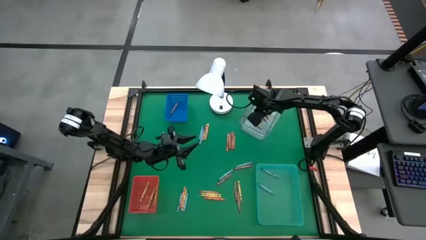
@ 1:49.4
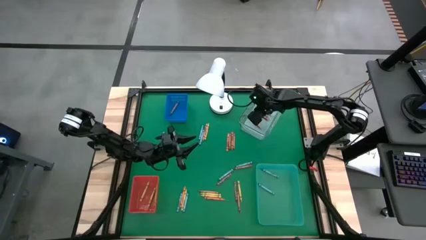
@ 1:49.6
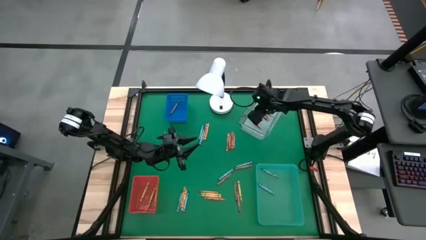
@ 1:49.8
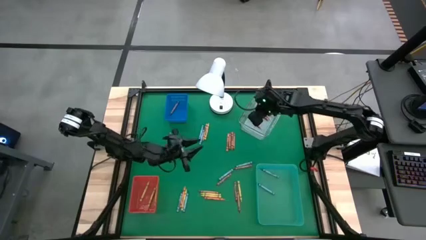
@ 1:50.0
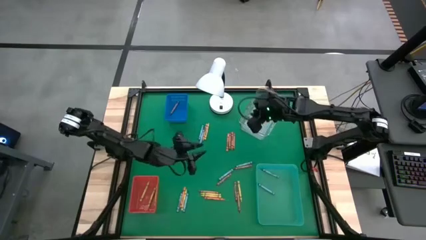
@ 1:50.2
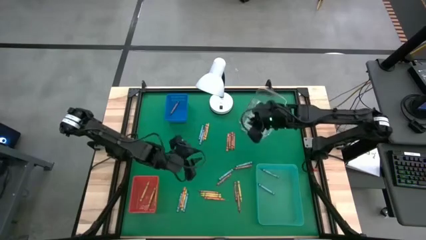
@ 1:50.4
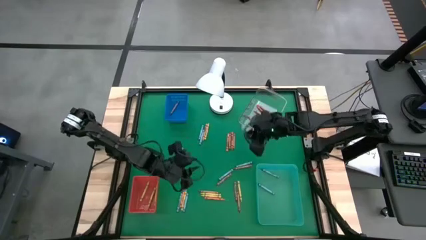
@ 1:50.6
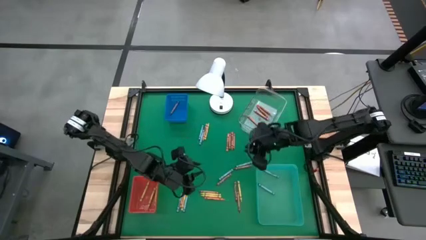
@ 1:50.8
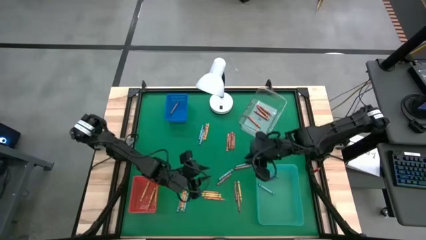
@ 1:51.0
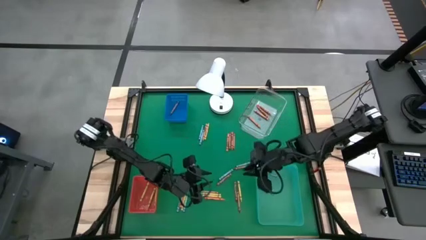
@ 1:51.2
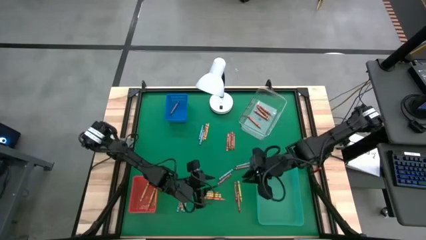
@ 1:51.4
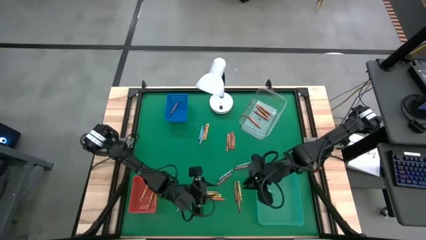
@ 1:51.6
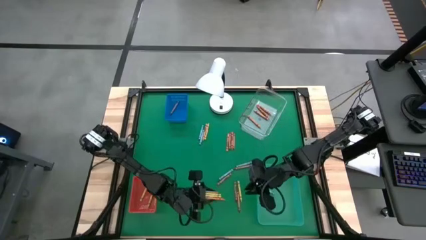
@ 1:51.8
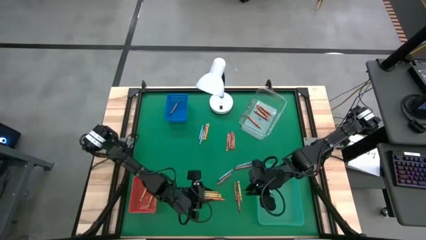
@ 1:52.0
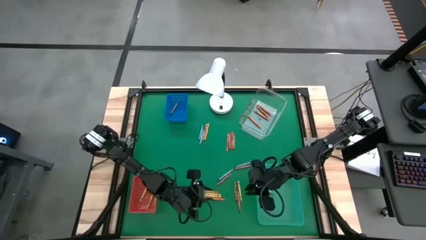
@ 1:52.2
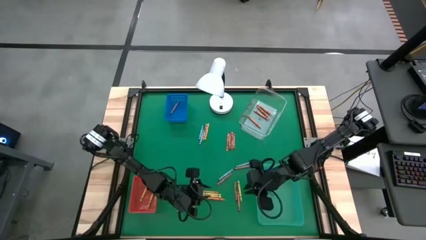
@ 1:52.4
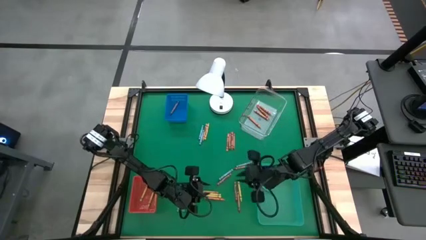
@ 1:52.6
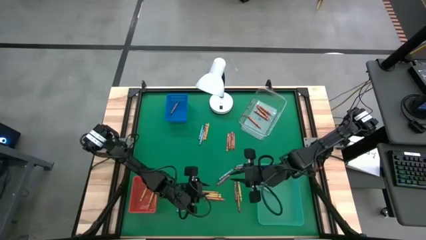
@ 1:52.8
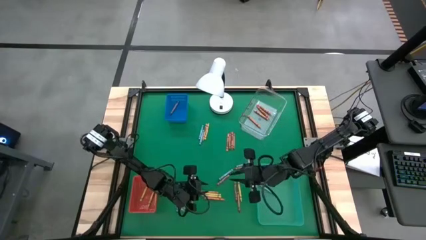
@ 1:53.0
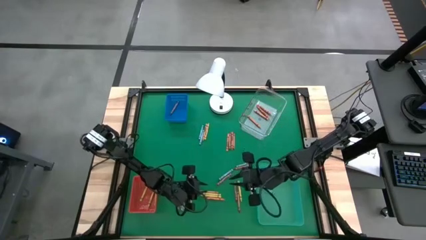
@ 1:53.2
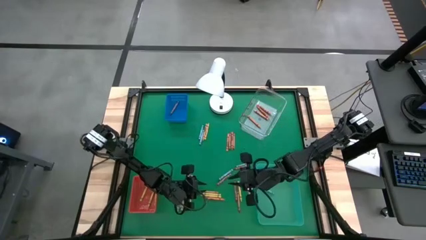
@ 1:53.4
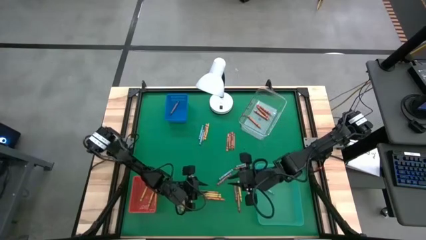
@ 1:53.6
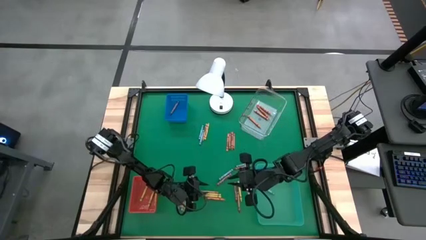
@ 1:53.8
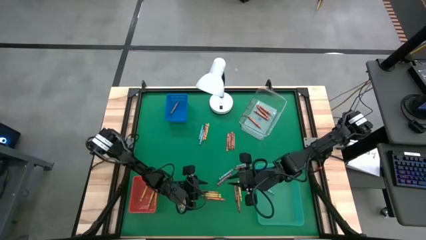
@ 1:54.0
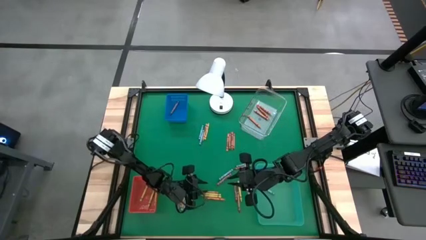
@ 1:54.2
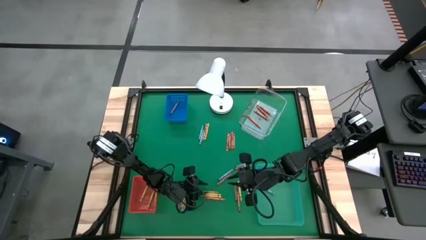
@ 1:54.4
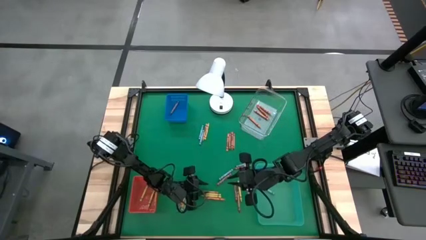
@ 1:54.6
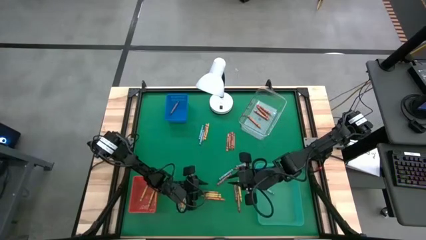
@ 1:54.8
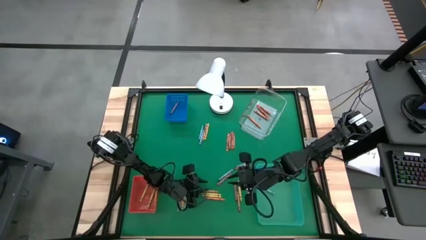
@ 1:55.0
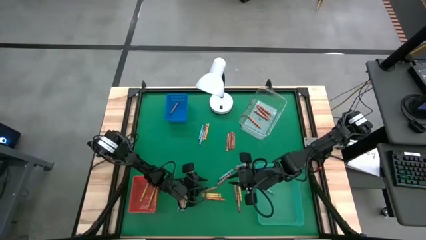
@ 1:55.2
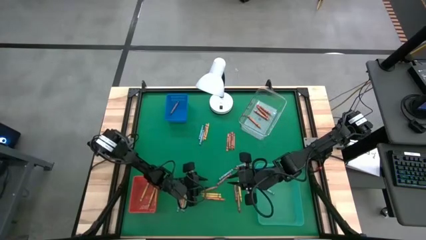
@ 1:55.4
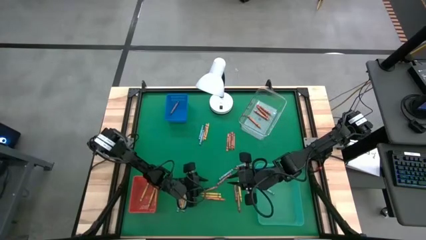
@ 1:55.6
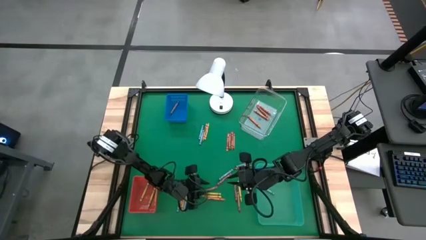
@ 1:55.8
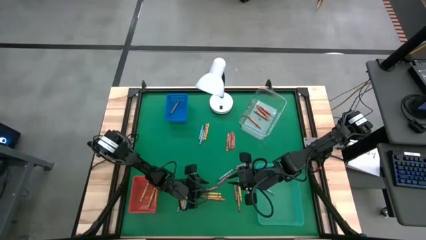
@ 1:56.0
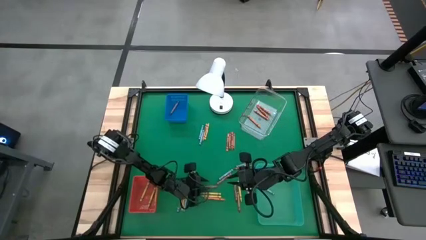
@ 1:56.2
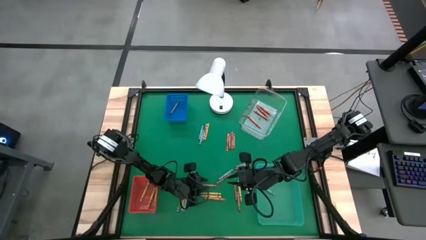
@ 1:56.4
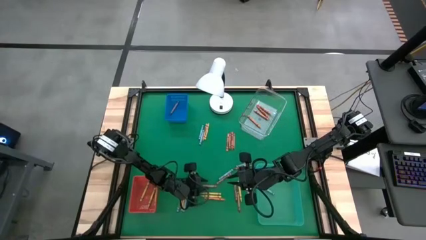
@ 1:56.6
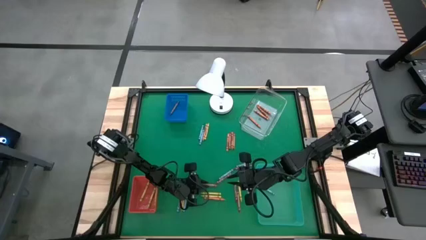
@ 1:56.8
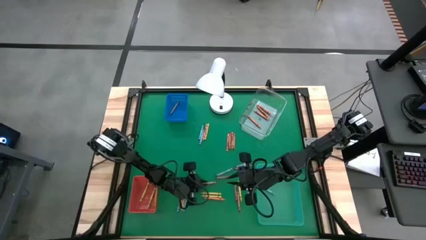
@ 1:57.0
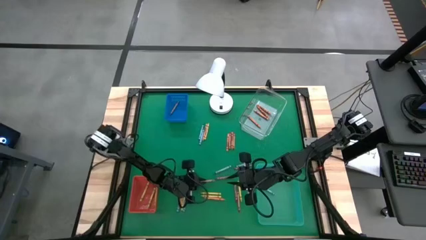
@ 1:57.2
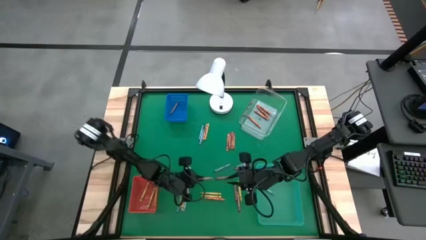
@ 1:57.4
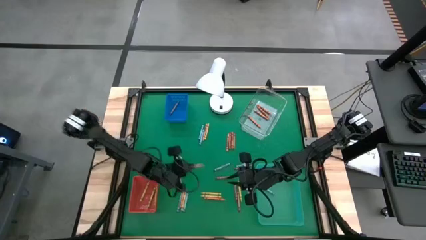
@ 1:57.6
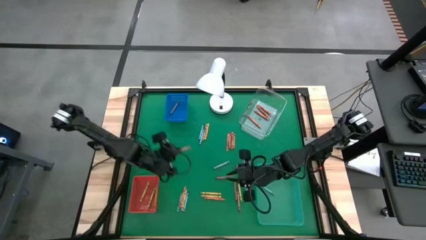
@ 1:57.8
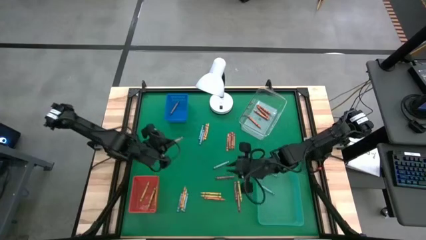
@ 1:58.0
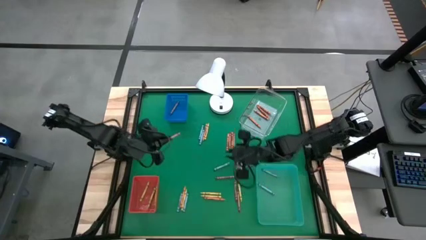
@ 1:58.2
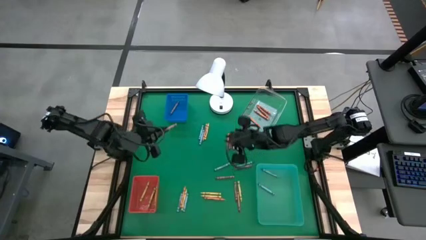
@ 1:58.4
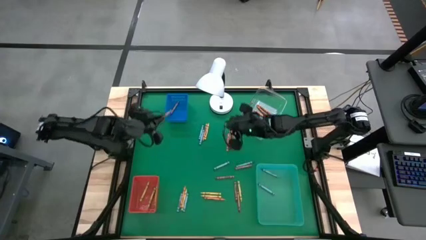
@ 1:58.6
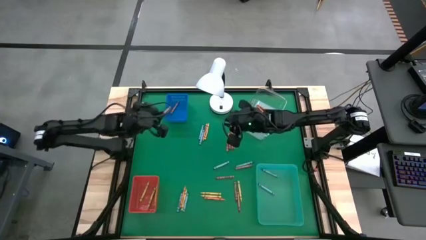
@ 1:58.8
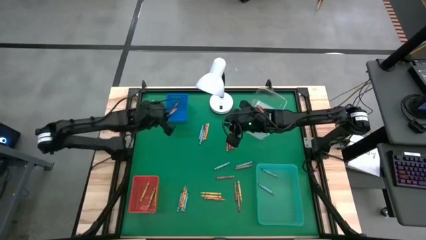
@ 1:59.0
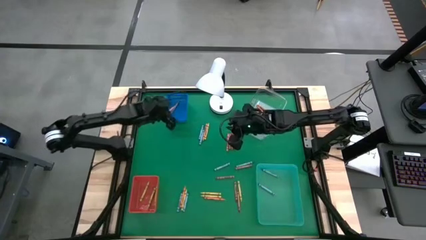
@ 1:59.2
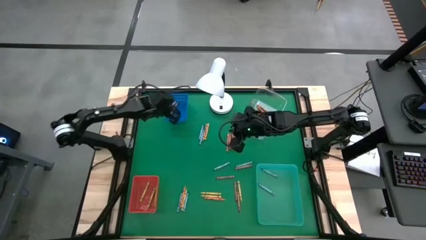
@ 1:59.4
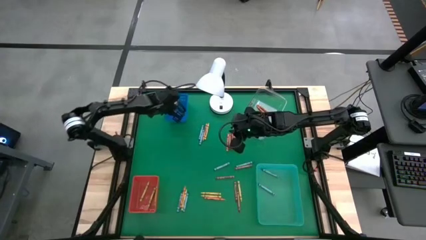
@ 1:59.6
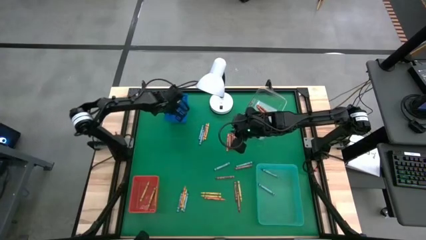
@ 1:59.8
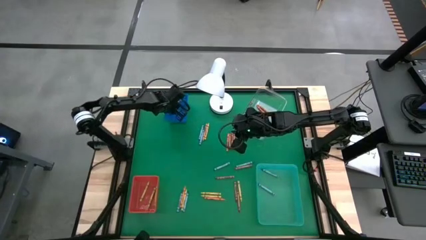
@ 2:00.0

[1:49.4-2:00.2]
Task: Sort crayons
Put the brown crayon into the blue bin

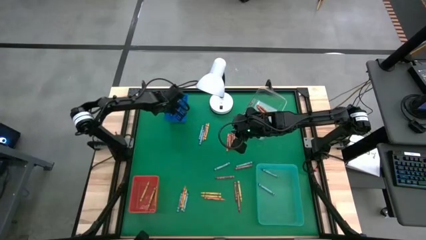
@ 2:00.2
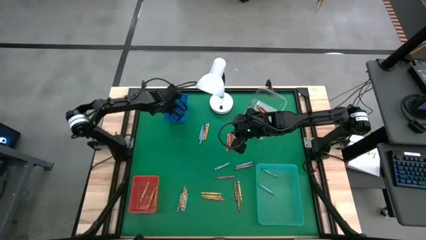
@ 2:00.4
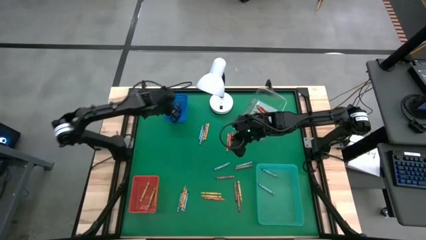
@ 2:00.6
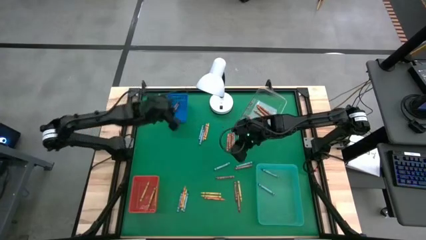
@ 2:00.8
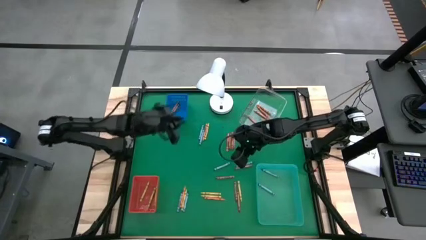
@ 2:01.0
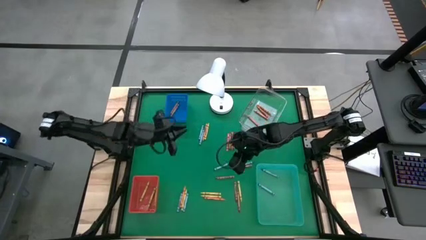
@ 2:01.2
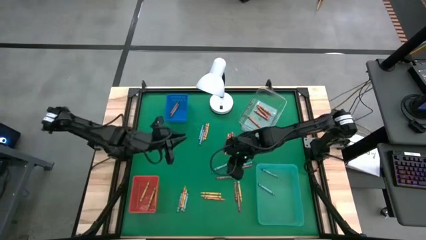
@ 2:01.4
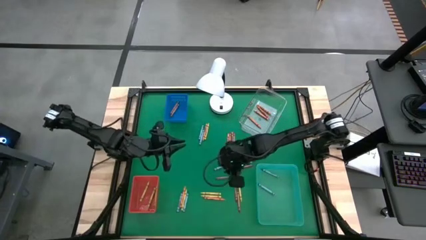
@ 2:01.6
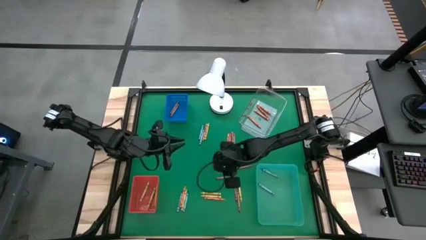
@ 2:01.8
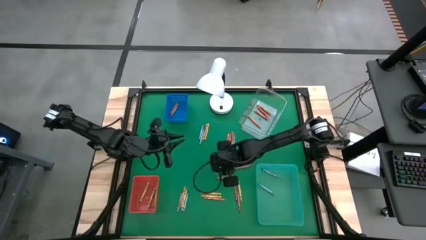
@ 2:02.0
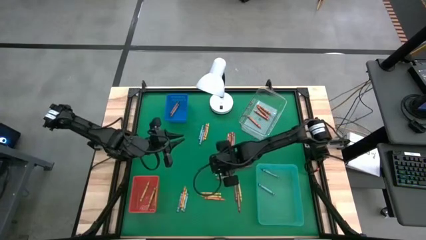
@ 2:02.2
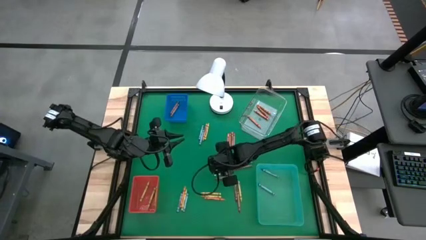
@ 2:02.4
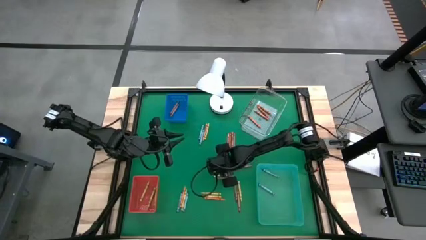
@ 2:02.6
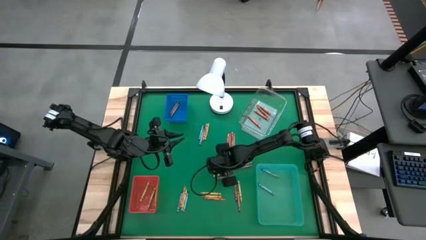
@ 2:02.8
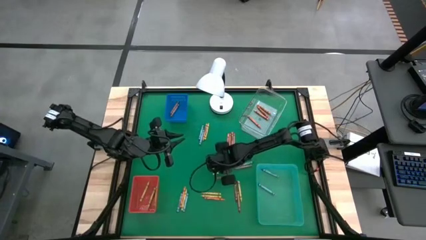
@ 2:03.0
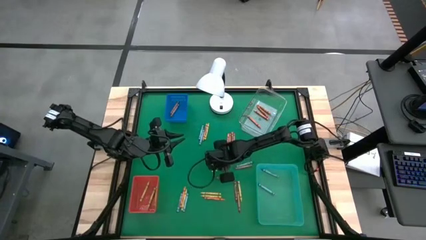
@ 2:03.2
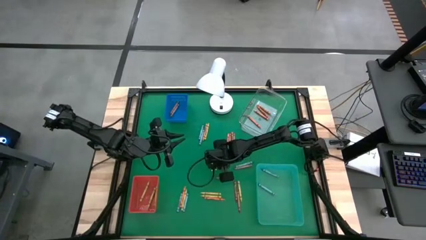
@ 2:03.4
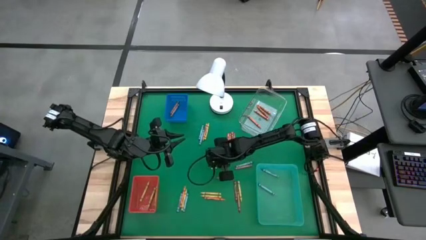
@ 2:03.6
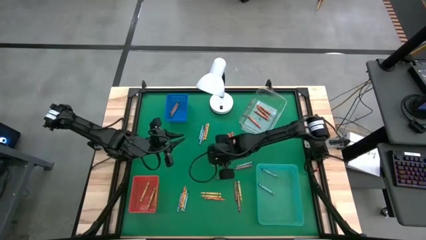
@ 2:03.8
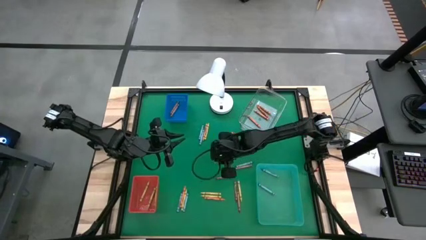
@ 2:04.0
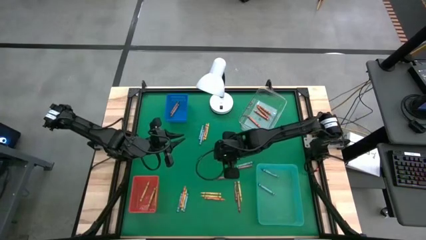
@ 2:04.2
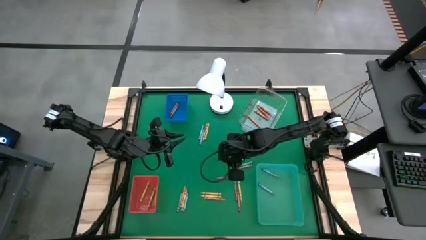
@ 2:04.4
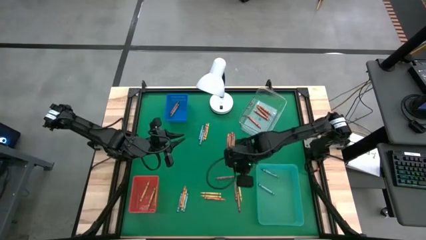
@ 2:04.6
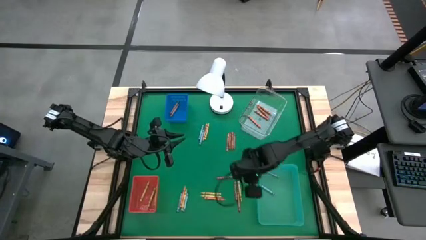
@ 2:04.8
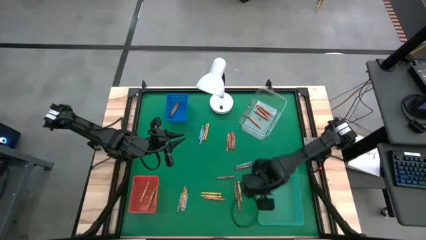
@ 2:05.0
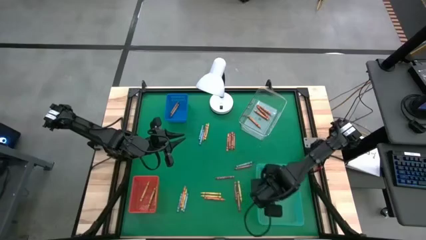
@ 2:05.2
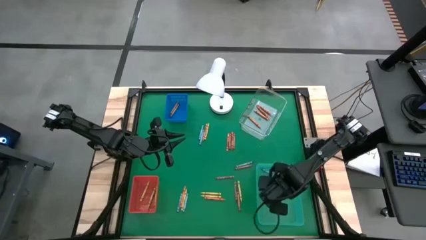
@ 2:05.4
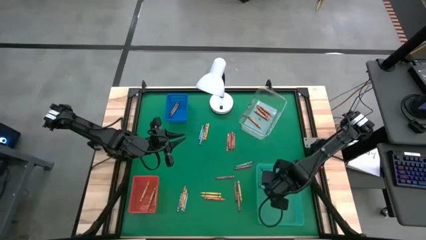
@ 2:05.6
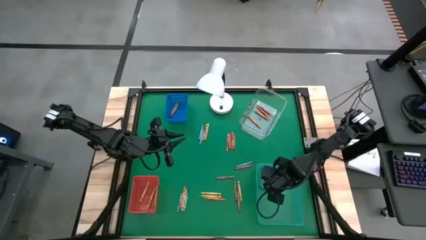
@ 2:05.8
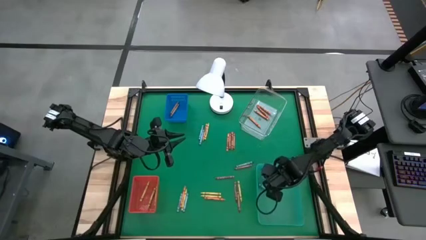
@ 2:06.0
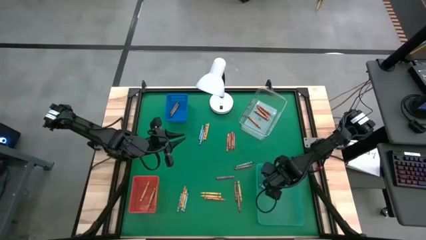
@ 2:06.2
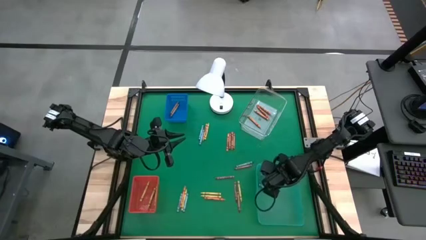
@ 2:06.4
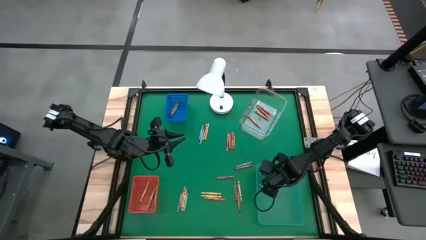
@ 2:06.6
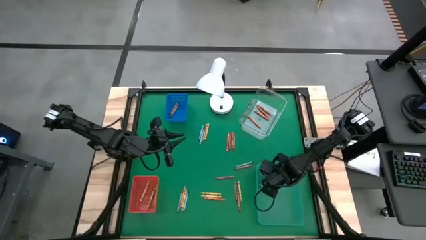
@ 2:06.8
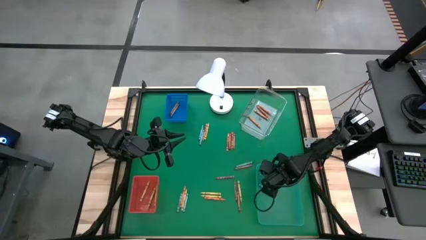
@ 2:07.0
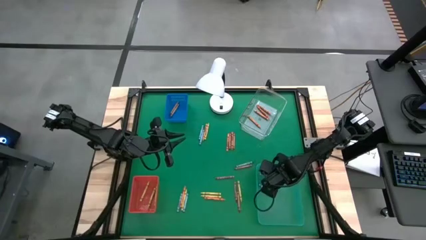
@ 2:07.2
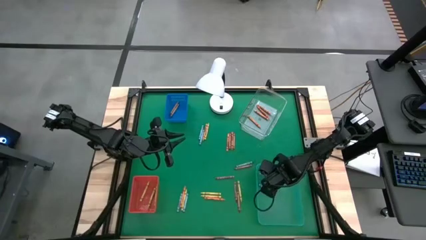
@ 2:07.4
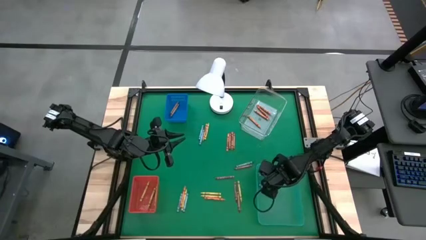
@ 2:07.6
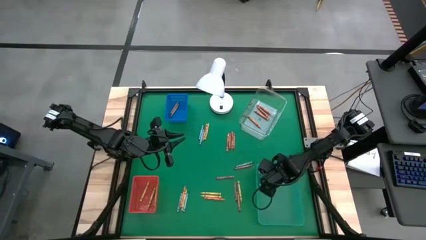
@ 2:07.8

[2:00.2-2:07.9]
Put the blue crayon into the green bin
